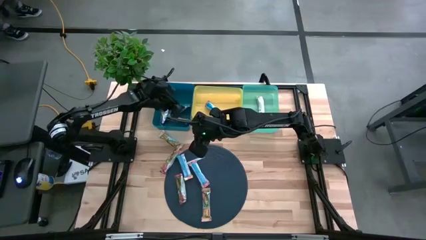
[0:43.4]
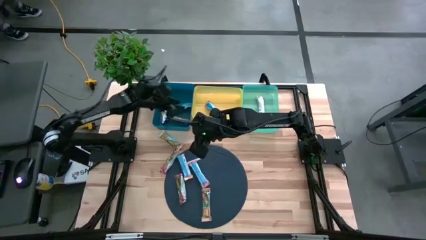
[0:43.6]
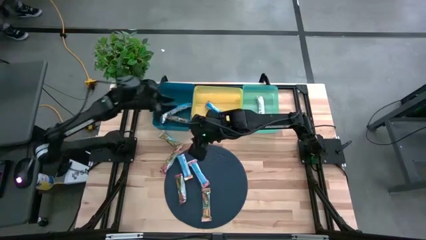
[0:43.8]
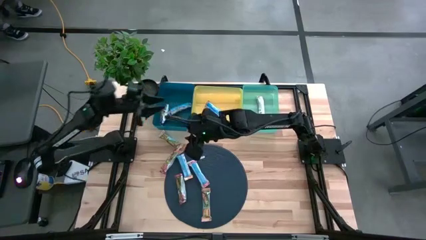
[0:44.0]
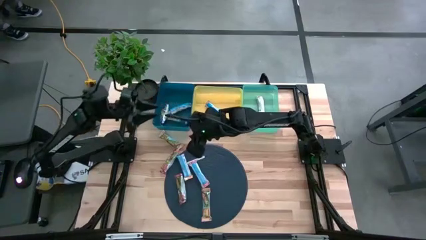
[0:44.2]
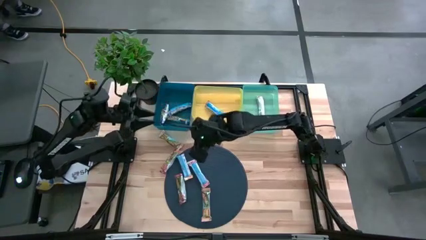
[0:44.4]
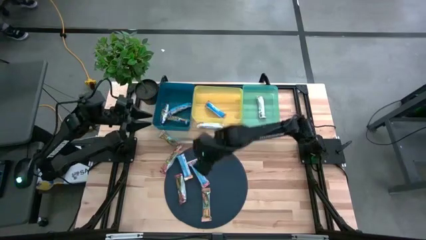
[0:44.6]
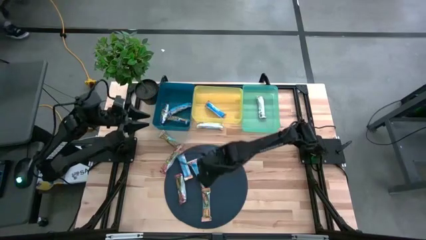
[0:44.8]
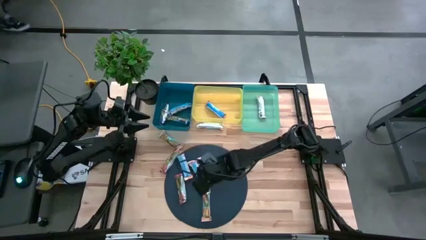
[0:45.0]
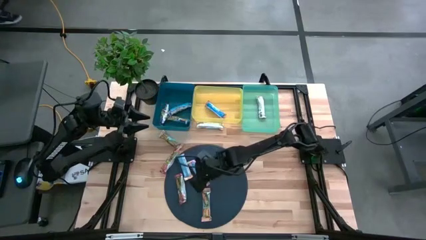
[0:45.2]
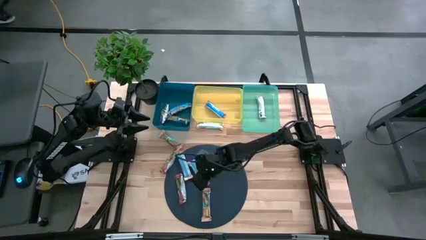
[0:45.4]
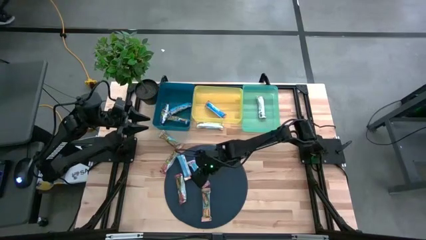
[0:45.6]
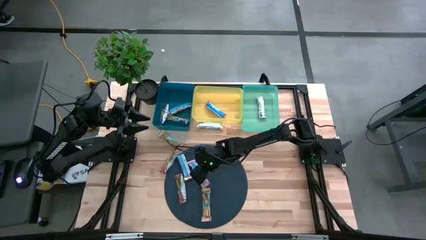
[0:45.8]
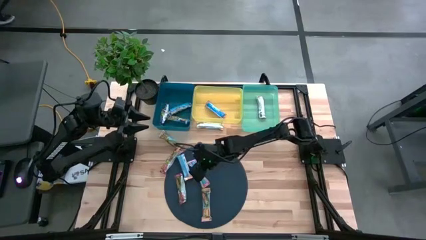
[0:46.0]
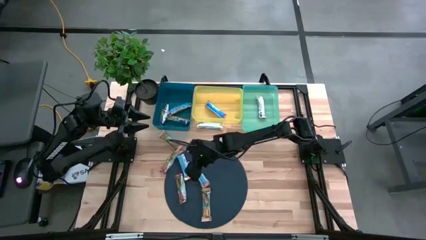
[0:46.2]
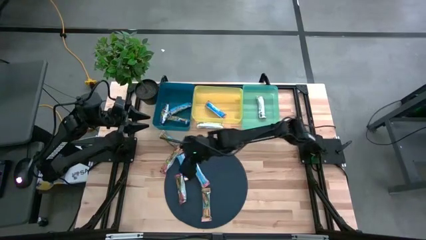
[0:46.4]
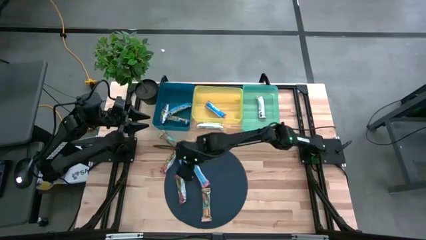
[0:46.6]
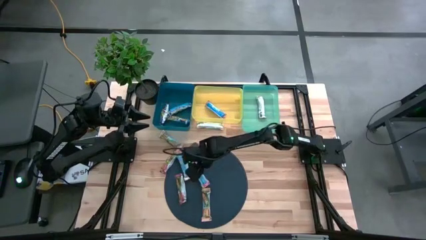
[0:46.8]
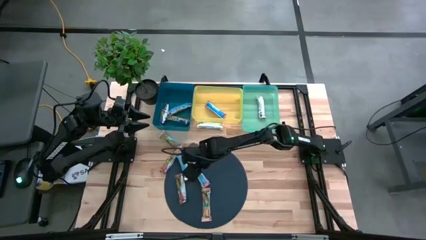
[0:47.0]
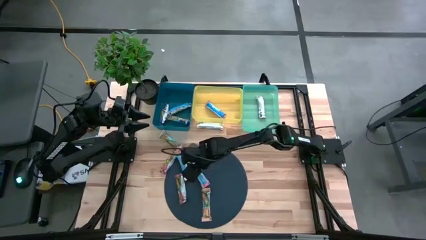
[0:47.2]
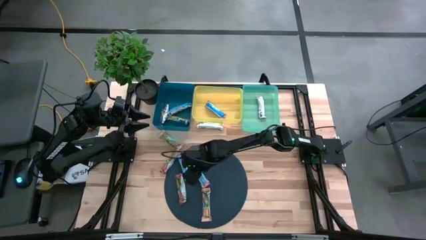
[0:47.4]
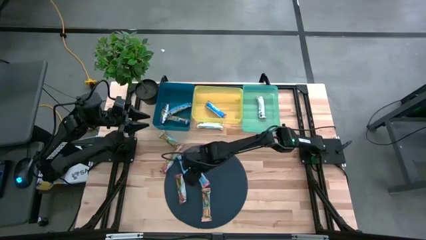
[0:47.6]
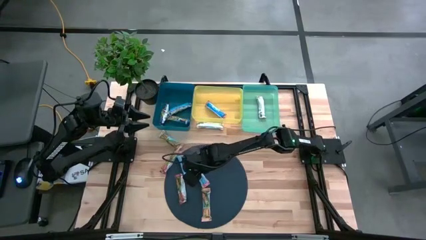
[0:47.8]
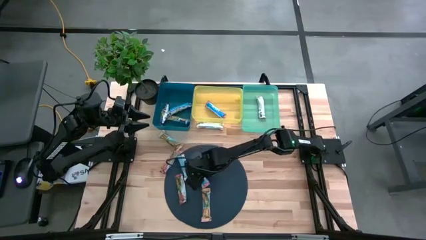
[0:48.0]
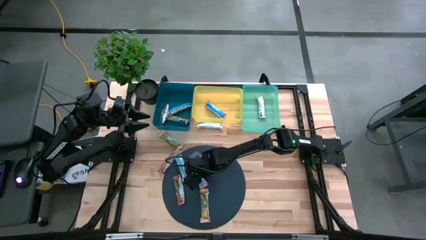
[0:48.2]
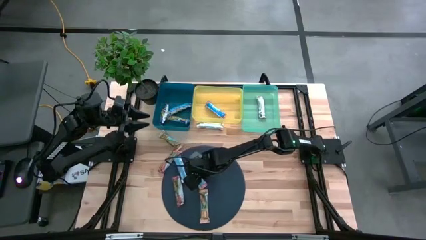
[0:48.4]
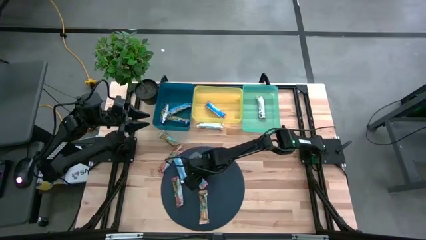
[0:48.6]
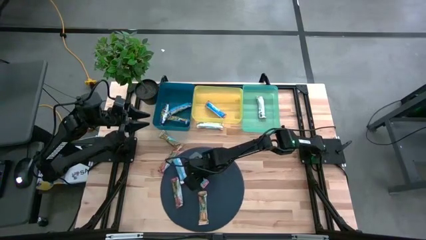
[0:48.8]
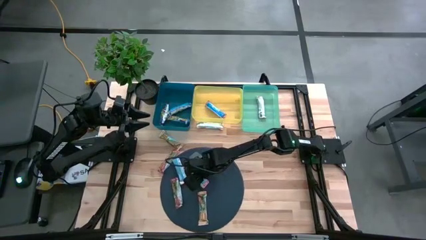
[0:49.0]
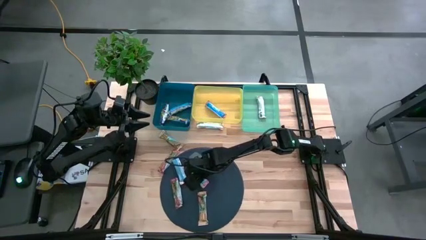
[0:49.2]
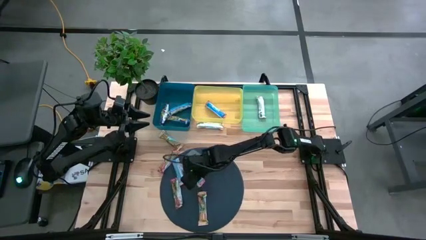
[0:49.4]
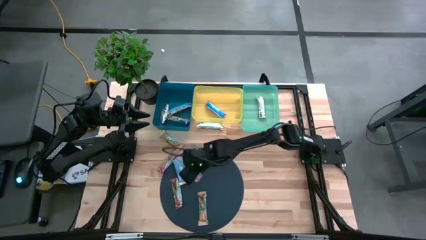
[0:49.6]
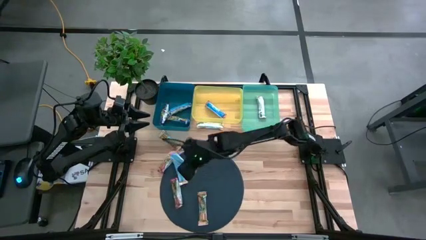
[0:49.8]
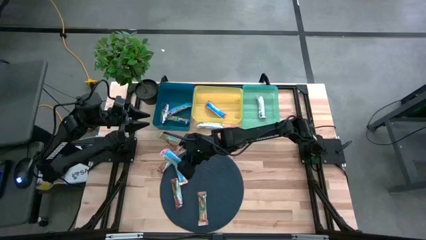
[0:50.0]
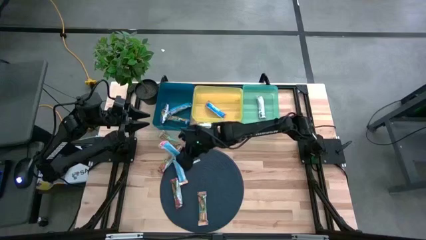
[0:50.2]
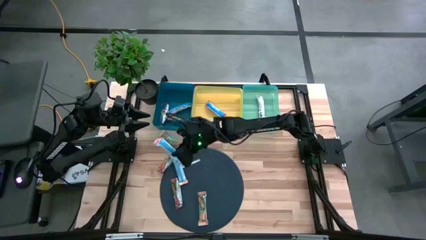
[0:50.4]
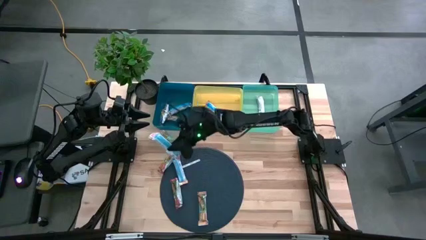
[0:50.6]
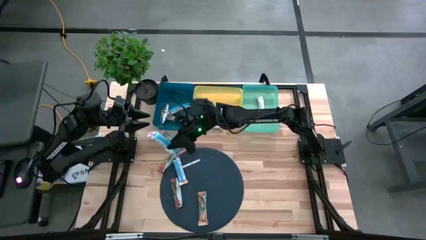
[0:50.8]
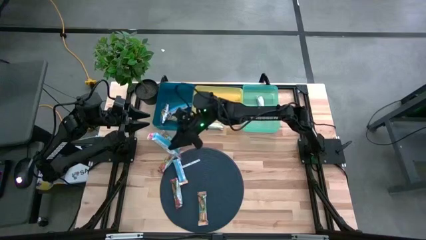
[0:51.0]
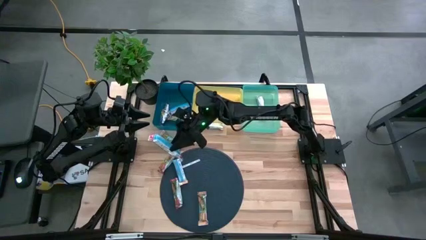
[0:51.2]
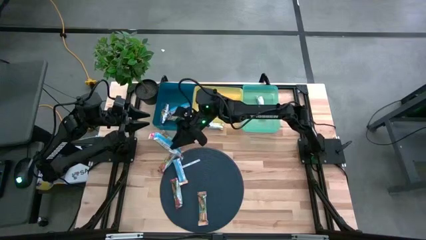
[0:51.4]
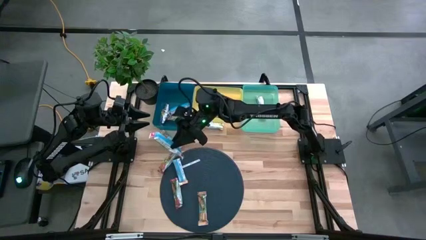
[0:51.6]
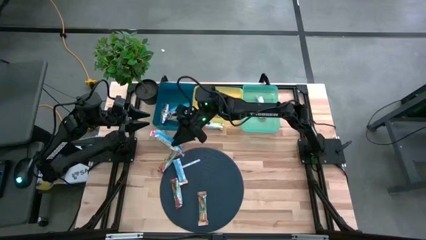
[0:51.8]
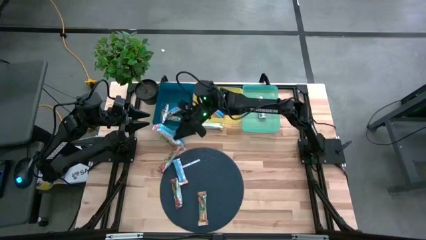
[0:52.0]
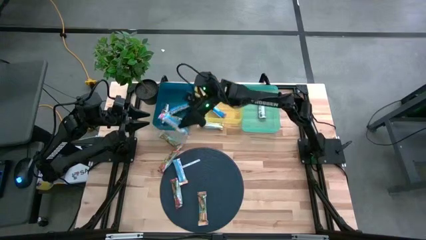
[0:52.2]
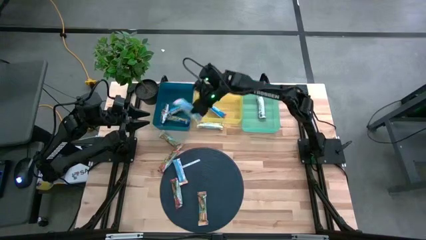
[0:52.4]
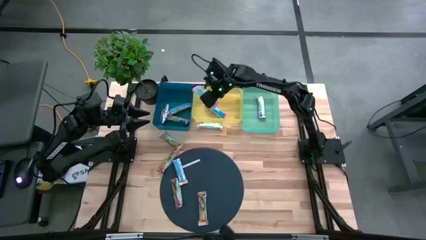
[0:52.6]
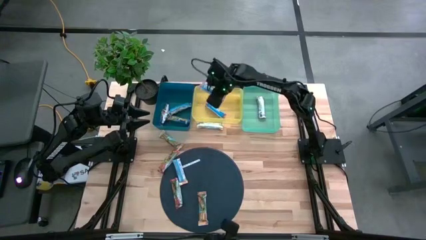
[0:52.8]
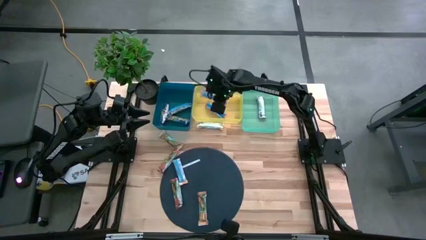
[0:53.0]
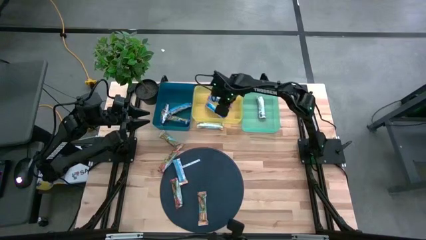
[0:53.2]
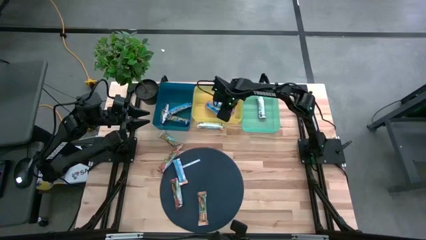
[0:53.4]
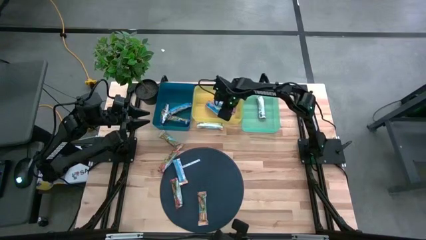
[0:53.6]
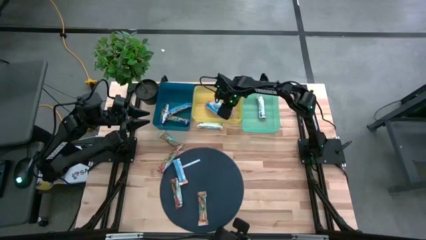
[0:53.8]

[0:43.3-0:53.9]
Task: Pick and place Granola Bars by type
Put the red granola bar into the yellow bin

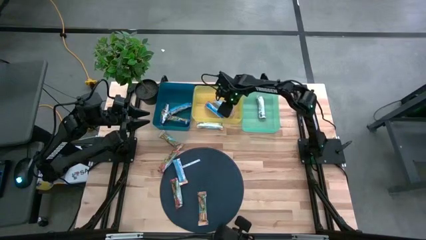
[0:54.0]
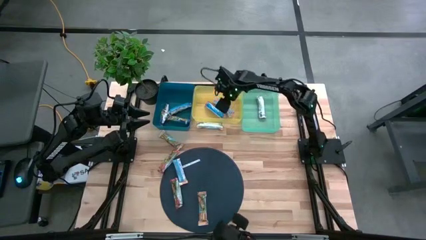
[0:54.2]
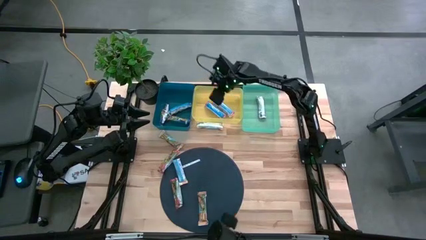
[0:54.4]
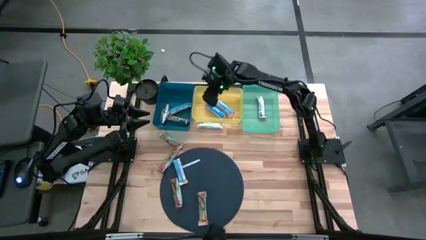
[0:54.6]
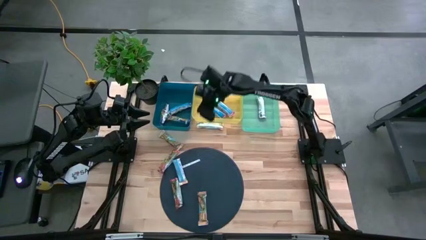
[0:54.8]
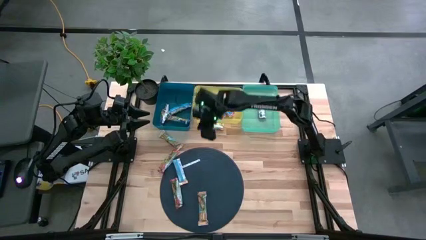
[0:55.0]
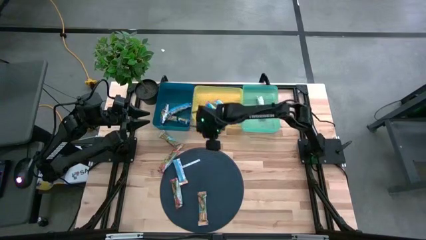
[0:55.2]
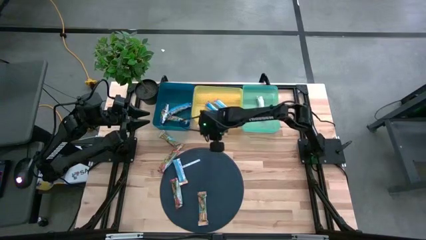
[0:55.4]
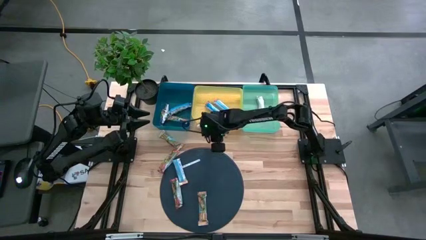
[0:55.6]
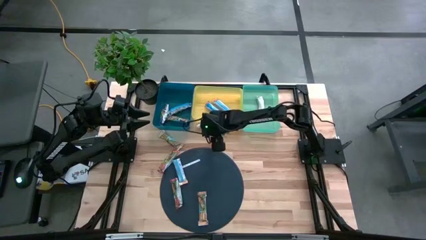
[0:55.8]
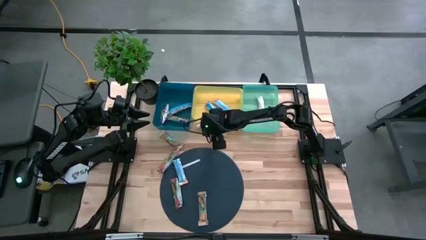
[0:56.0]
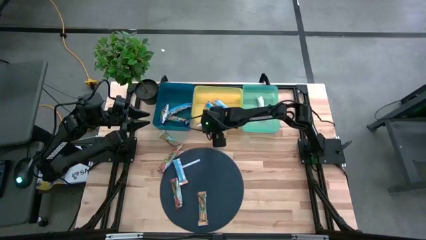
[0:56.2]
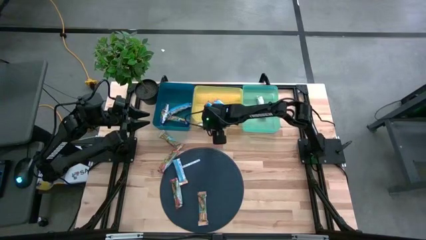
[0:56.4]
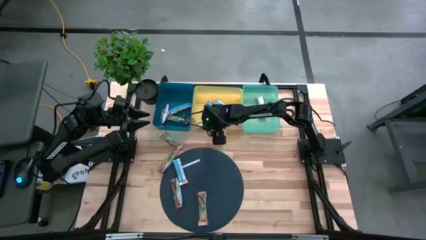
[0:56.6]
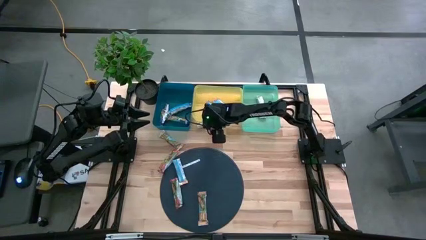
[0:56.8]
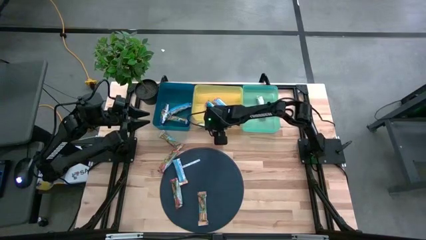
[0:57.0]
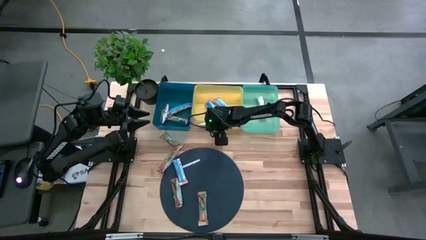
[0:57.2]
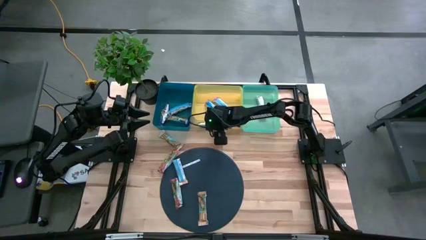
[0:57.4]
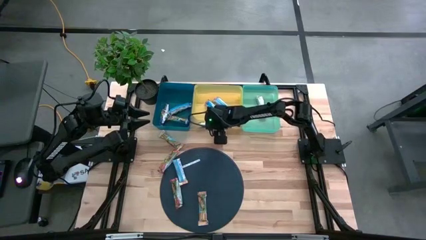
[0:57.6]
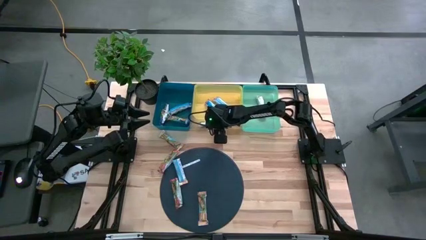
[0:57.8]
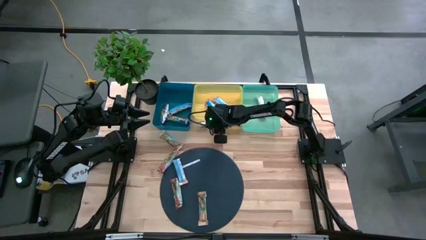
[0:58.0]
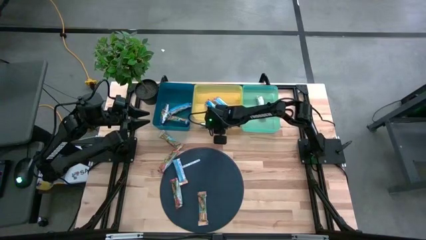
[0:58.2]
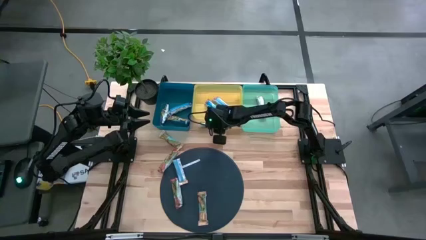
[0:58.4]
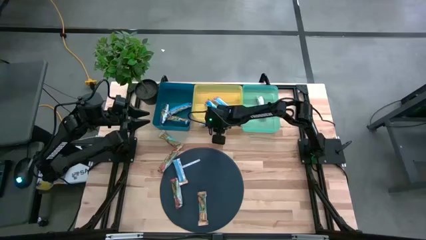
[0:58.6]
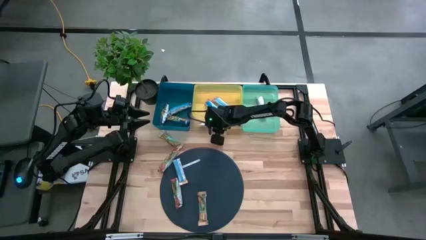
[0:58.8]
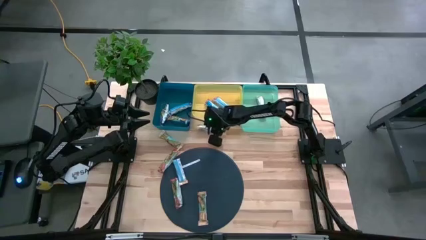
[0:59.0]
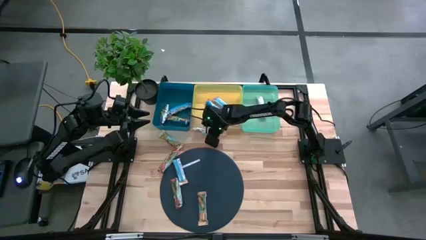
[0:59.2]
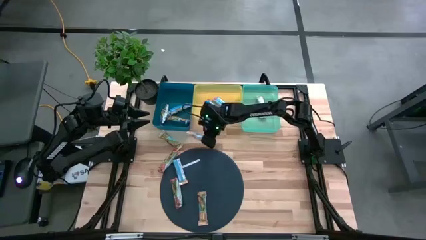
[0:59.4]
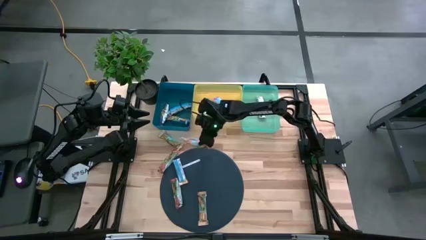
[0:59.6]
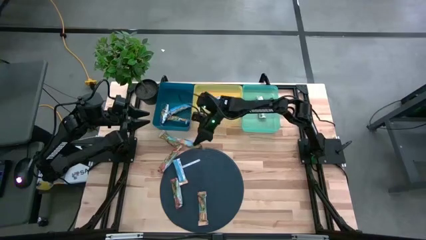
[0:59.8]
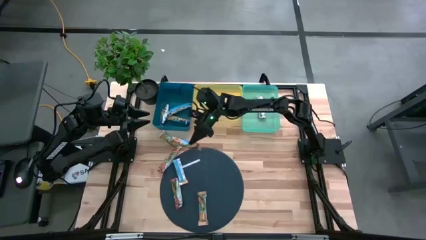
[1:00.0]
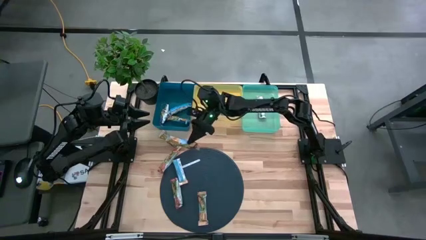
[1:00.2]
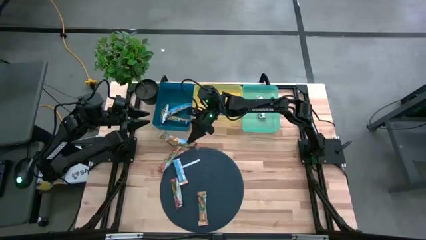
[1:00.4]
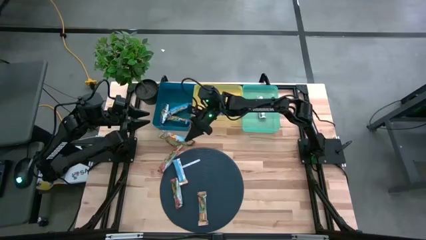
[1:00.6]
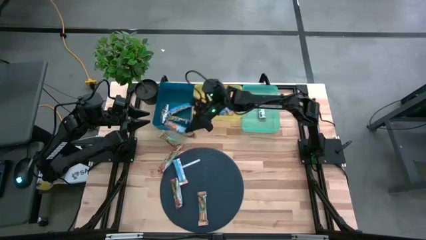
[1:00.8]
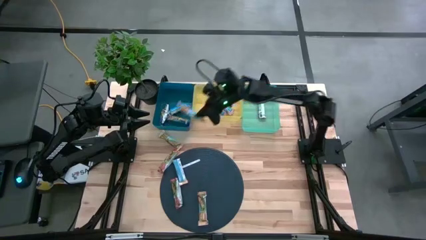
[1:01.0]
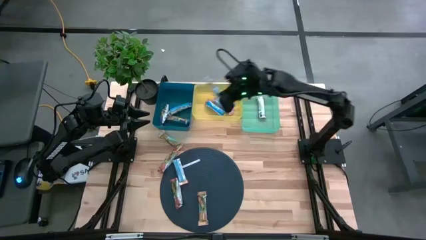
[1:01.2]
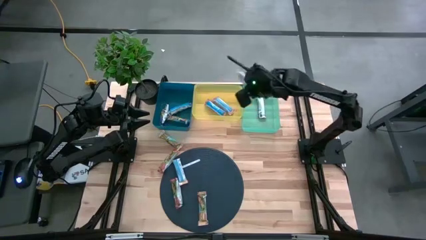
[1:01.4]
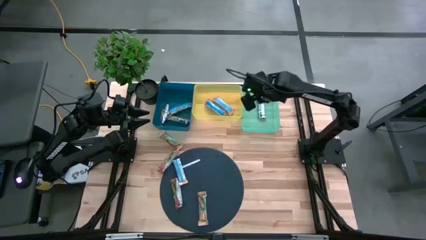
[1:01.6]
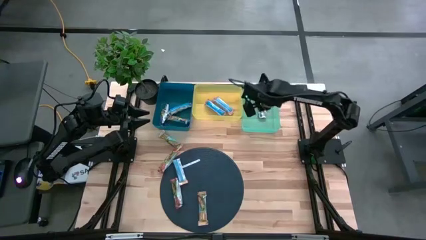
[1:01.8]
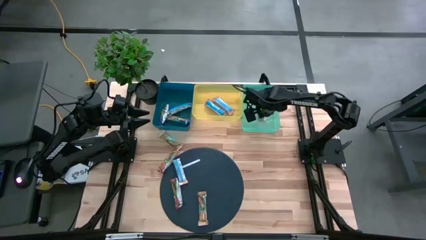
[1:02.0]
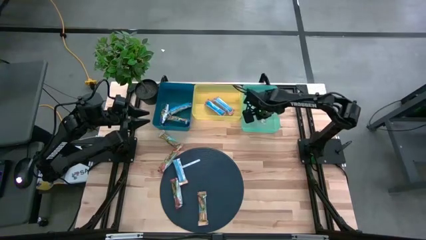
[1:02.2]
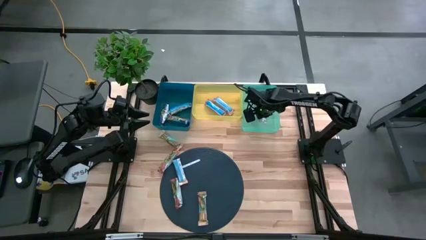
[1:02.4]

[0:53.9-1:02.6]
Put the yellow granola bar into the green bin
